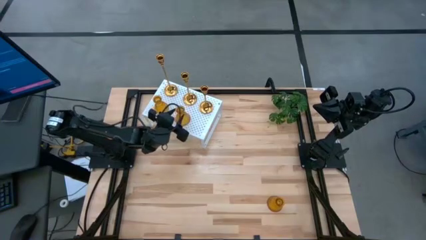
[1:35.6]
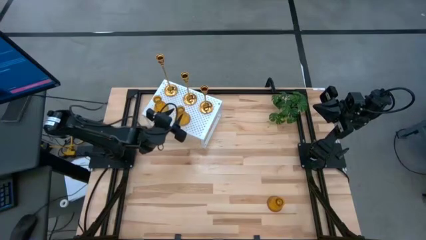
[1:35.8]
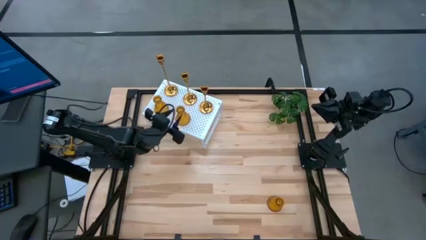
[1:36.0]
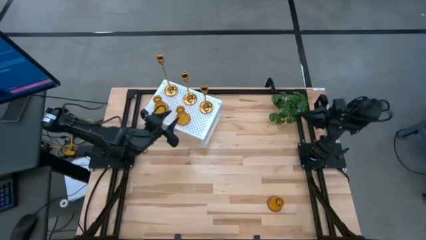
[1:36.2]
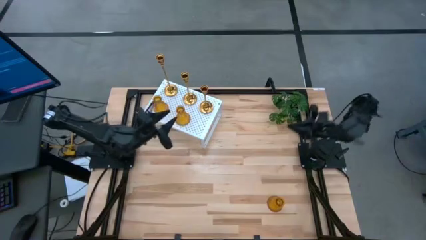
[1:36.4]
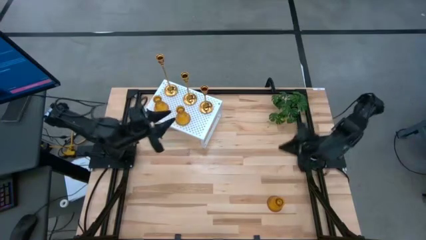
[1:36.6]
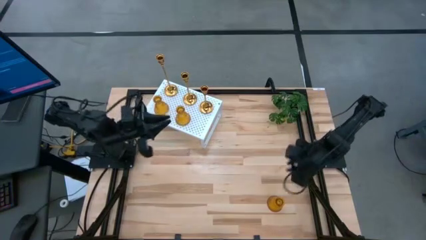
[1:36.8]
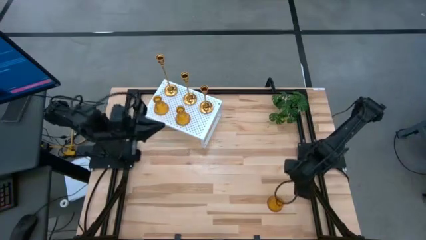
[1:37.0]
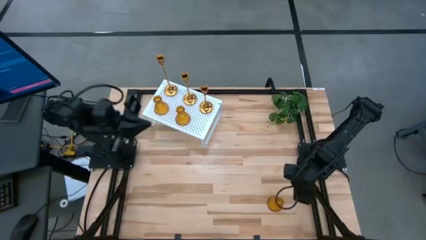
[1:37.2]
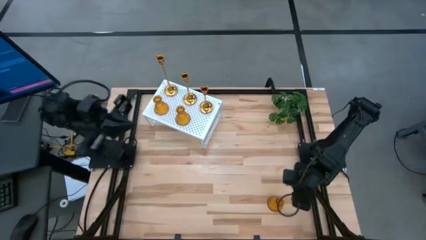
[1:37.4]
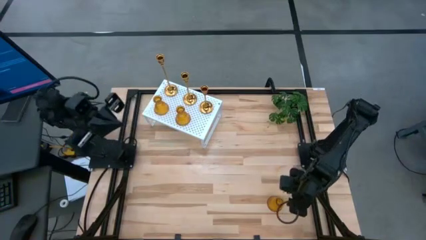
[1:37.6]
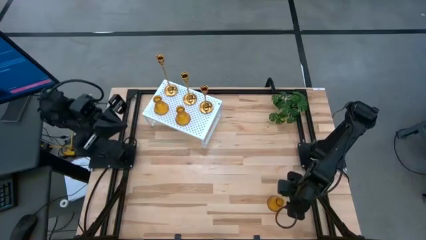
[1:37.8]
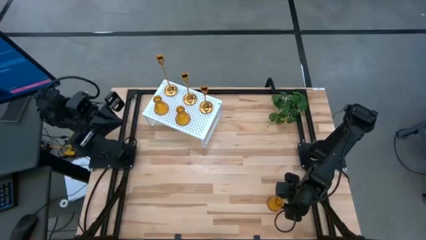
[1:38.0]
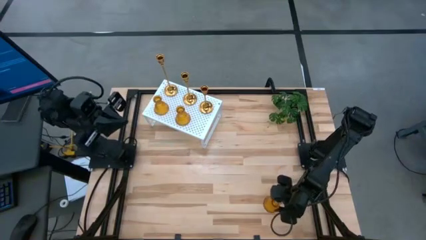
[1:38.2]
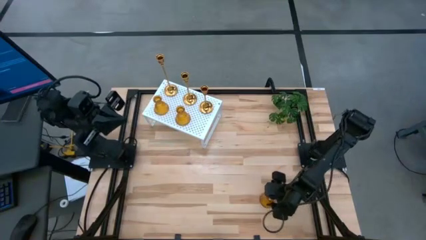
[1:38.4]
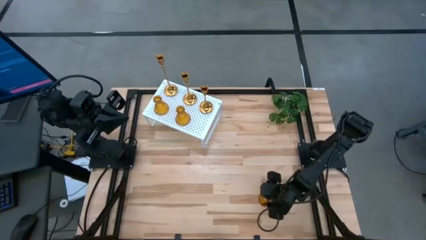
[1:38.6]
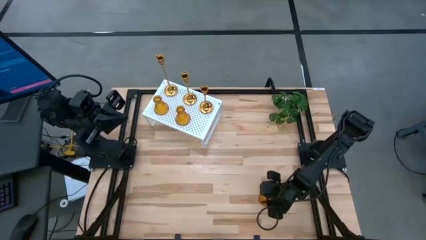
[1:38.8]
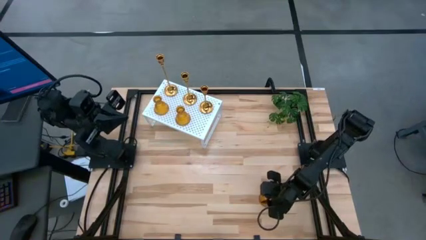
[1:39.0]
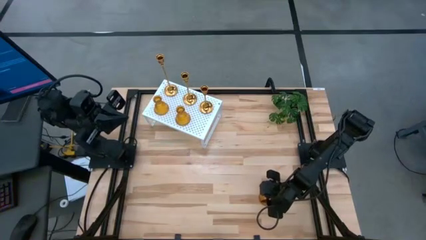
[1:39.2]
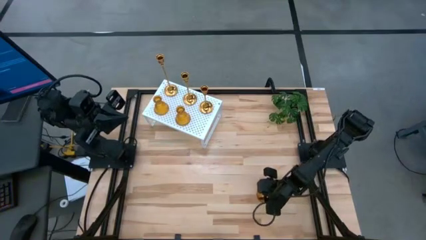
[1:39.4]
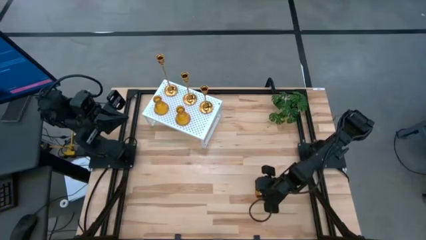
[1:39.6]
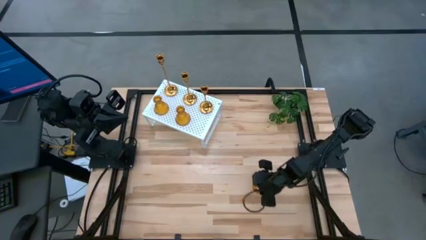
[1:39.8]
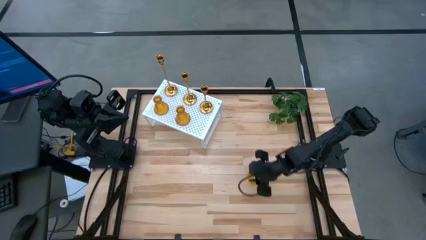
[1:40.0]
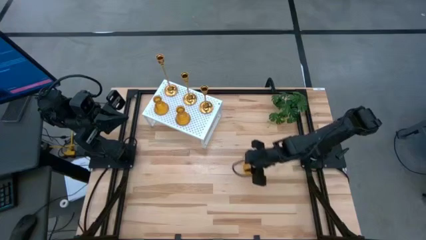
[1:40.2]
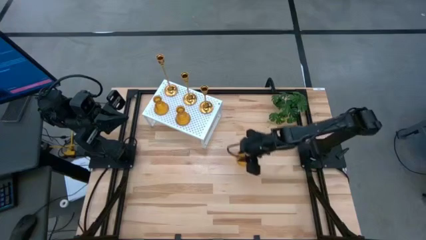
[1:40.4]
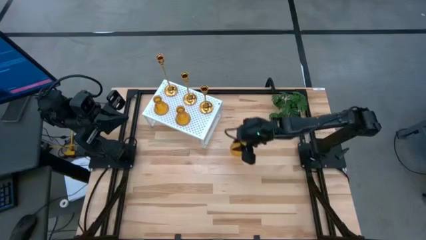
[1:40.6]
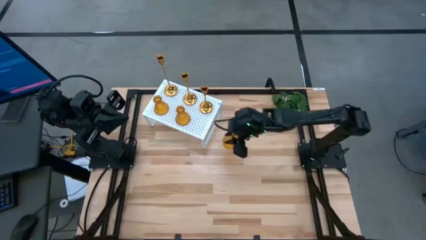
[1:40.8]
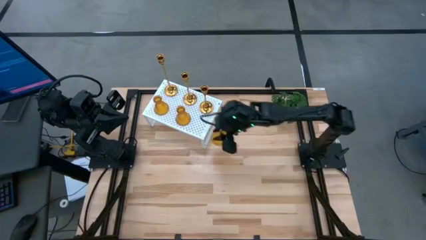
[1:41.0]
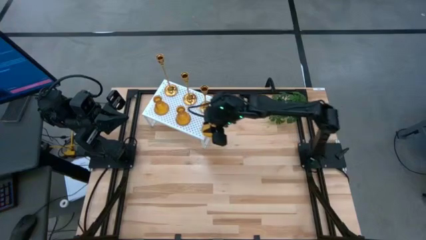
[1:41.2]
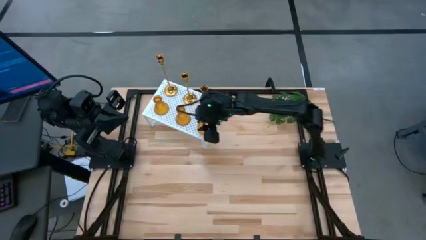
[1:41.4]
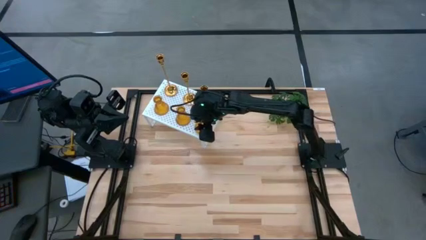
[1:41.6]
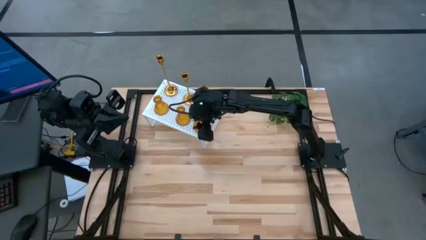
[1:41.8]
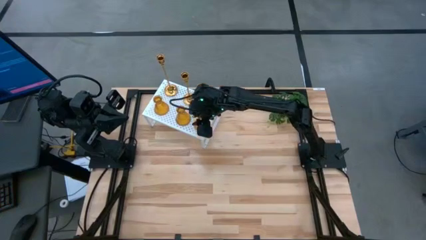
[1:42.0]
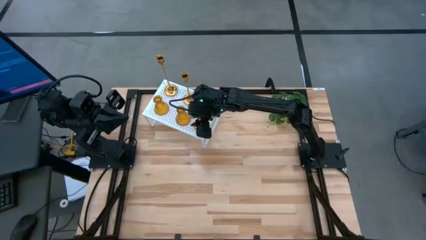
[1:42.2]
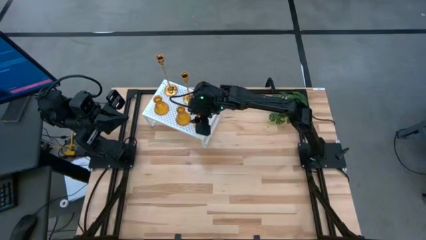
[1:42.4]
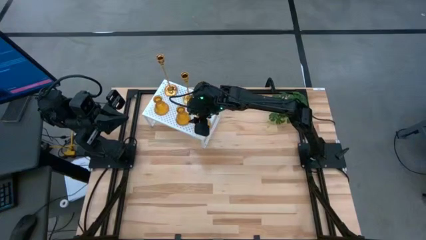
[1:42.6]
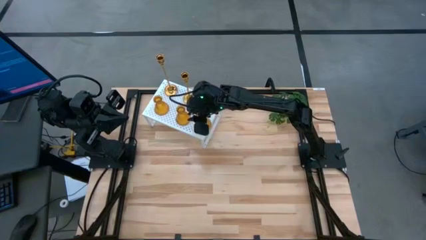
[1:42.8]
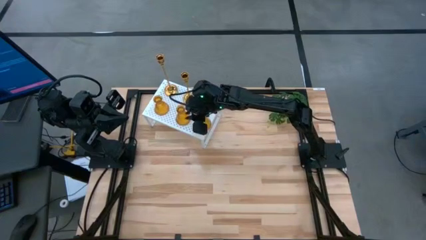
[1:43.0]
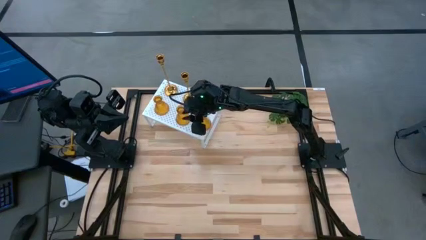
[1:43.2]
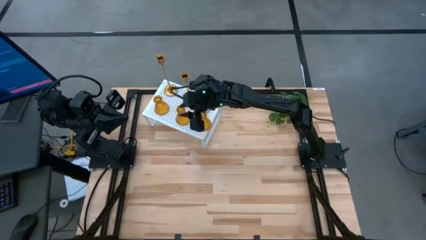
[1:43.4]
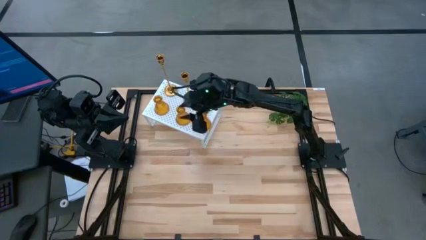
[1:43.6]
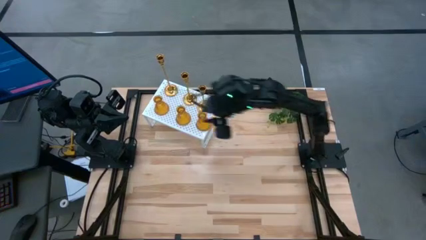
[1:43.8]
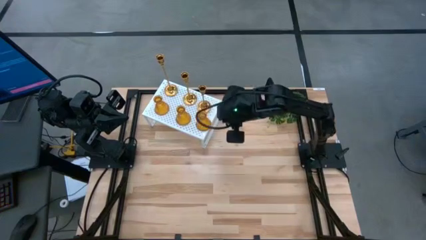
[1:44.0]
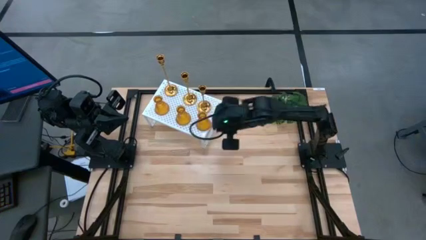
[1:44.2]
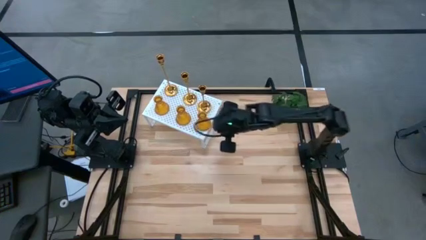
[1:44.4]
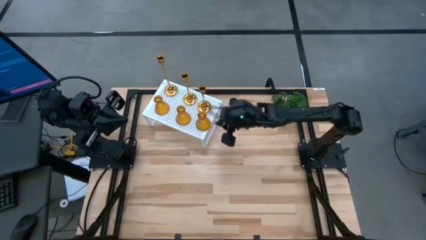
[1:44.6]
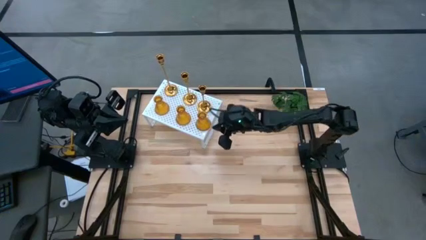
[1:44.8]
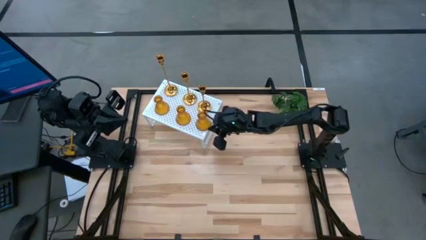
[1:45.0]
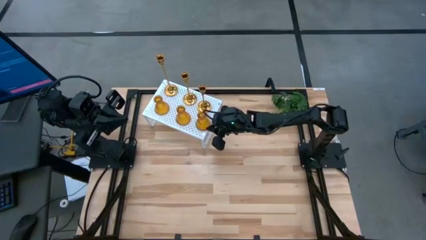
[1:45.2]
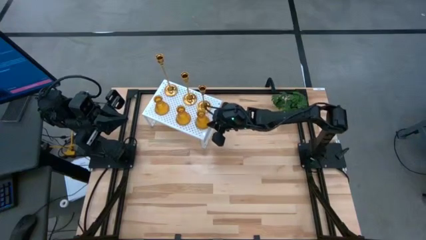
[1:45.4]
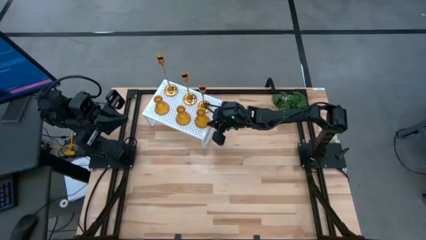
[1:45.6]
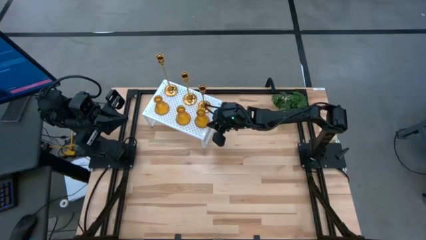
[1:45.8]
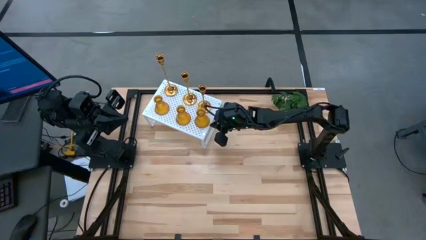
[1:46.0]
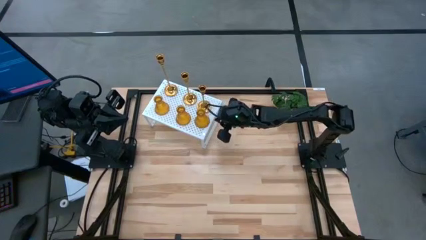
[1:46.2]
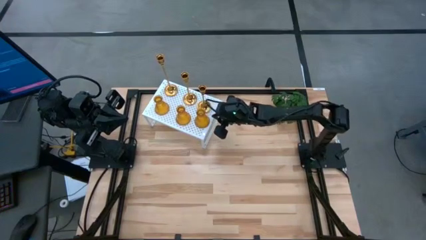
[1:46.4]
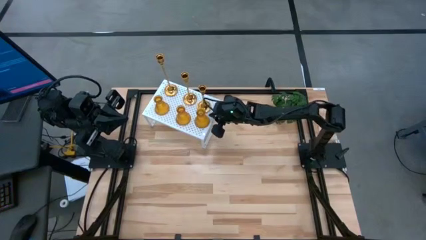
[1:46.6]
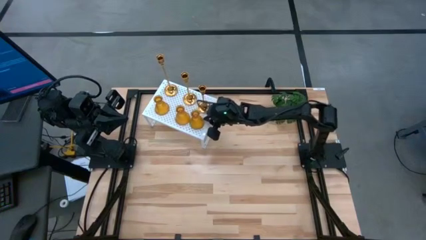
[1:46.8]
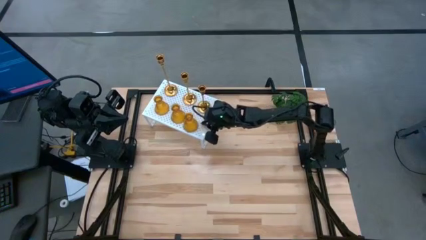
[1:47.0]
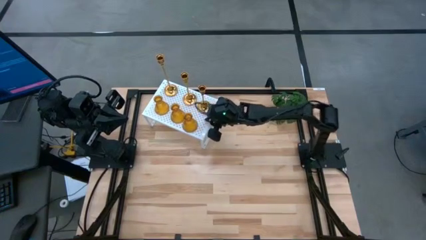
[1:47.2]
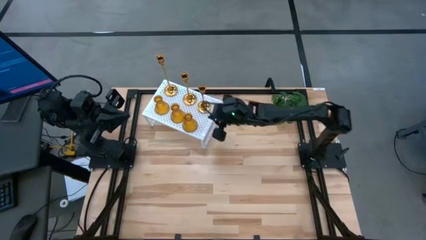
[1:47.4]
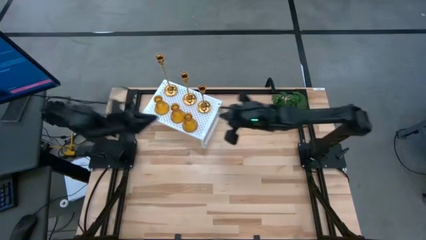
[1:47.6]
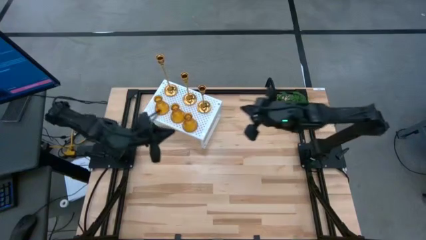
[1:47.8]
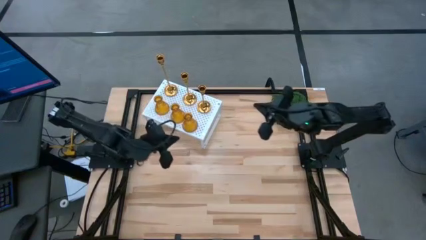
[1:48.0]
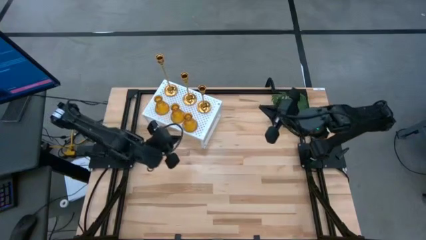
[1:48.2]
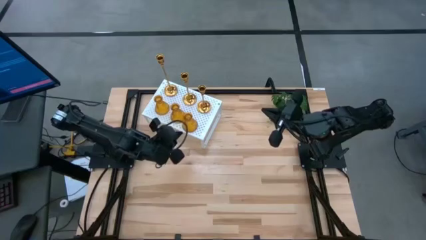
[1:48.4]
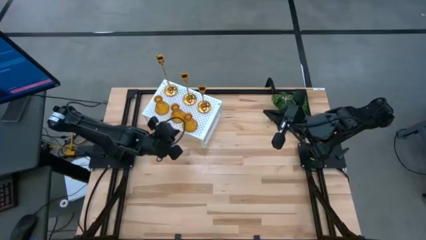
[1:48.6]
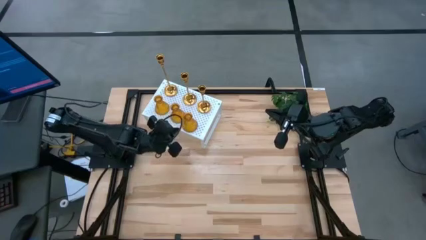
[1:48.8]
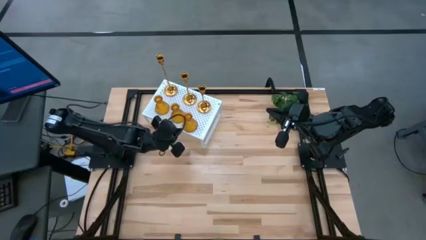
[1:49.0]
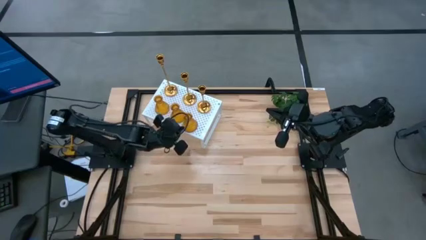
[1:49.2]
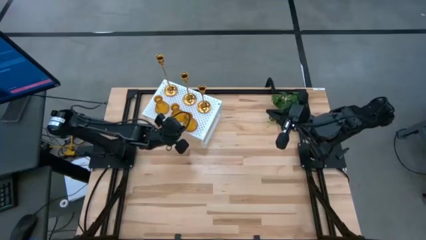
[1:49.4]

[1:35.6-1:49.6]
Task: Pick & Place candle stick holders
Put the brown glass candle holder on the shelf aligned with the other brown glass candle holder

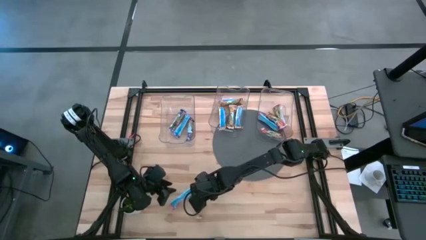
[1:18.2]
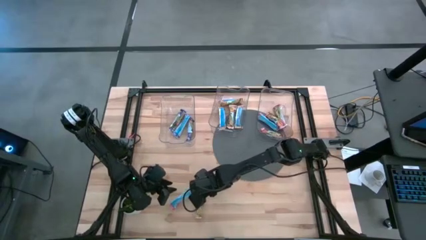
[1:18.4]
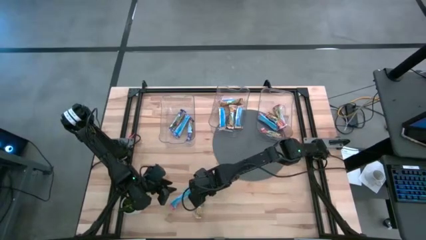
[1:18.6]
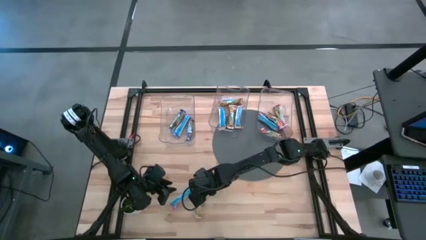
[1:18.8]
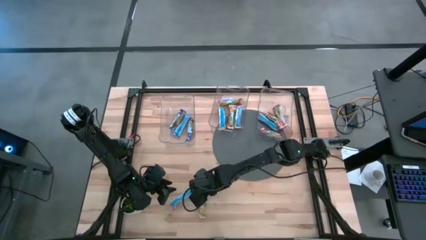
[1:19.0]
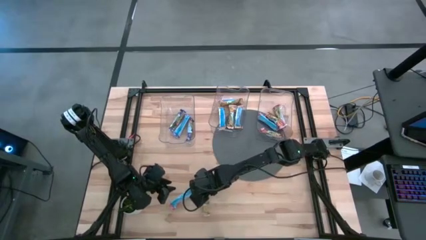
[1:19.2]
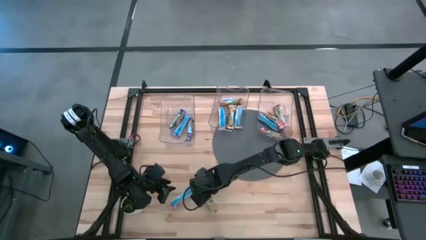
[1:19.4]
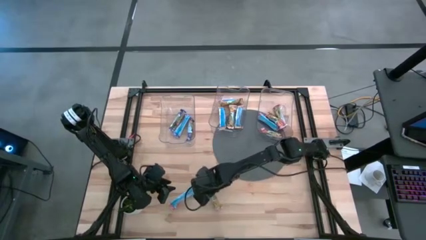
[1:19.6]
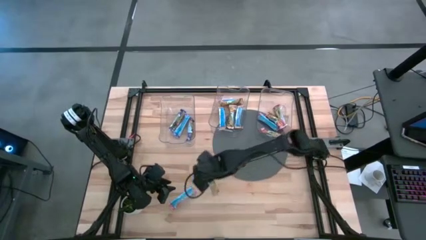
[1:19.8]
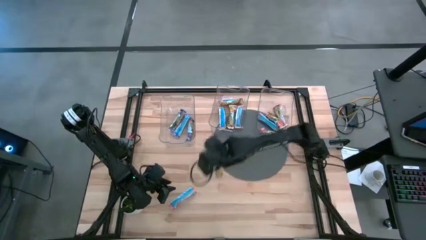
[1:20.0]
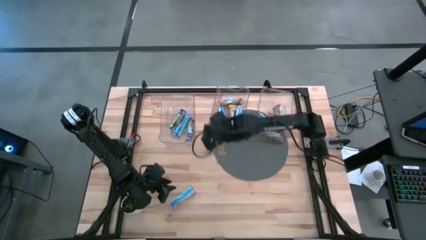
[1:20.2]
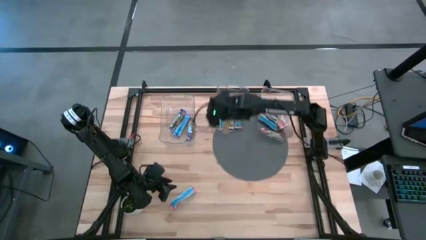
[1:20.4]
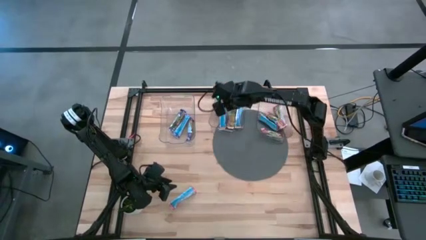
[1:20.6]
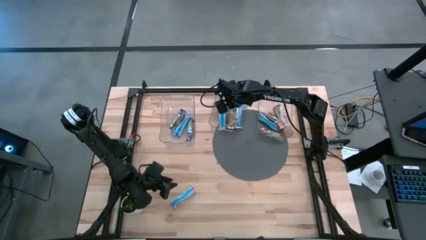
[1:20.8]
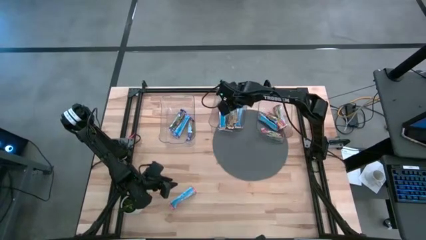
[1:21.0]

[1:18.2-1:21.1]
Task: Pick and place Granola Bars by type
Put the yellow granola bar into the middle transparent bin
